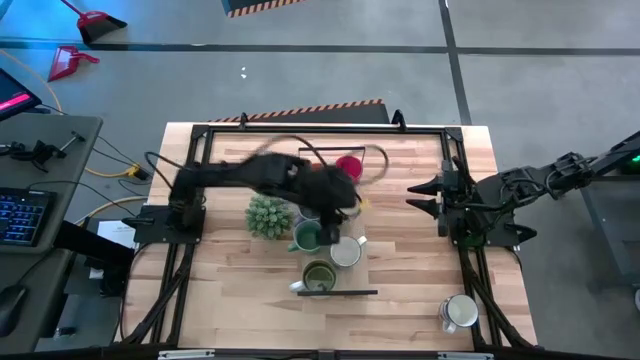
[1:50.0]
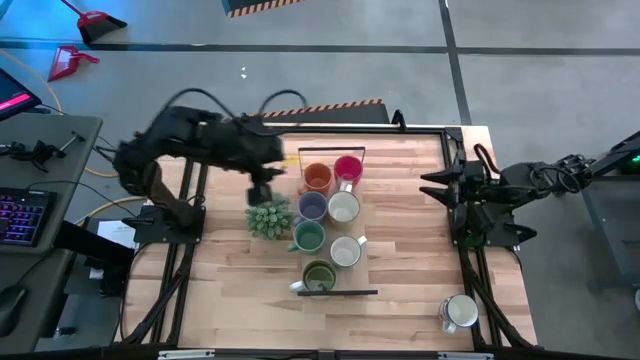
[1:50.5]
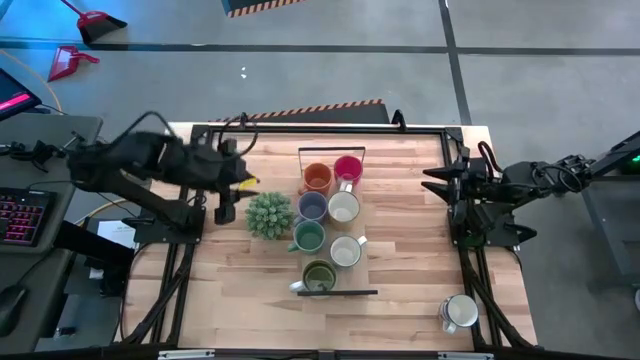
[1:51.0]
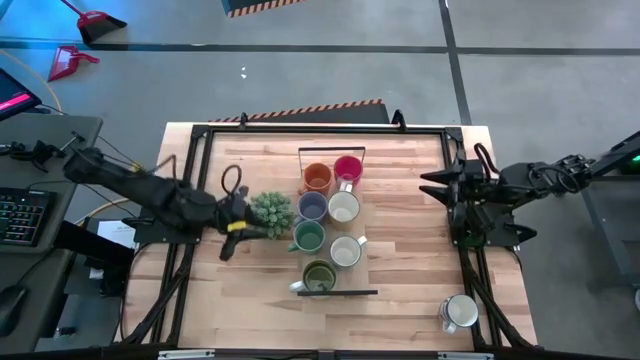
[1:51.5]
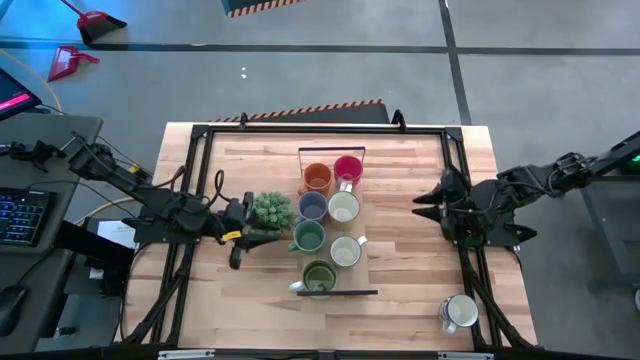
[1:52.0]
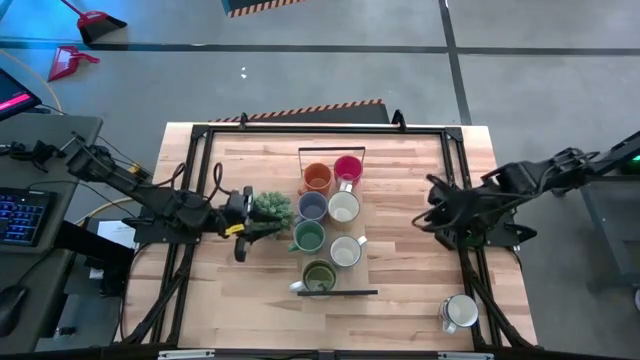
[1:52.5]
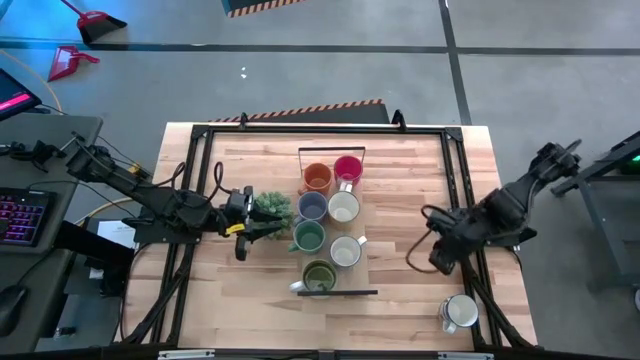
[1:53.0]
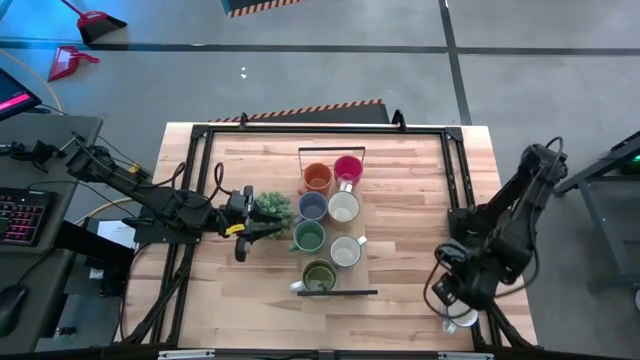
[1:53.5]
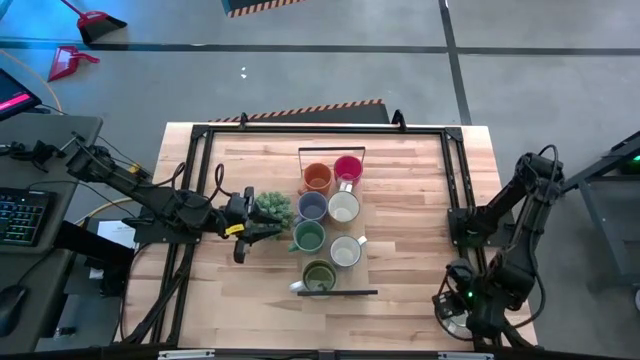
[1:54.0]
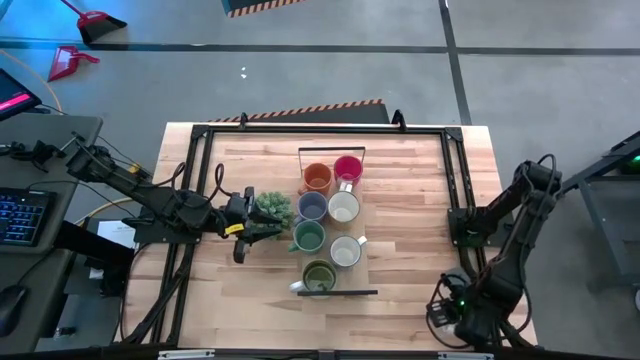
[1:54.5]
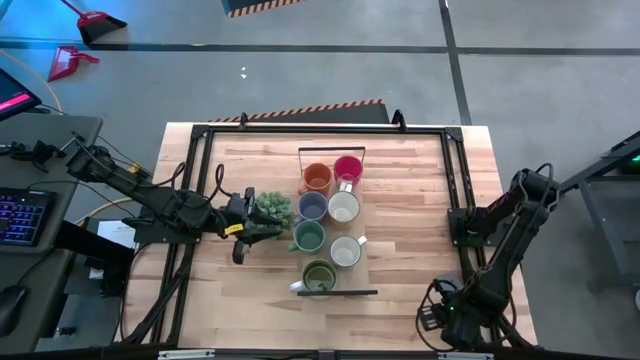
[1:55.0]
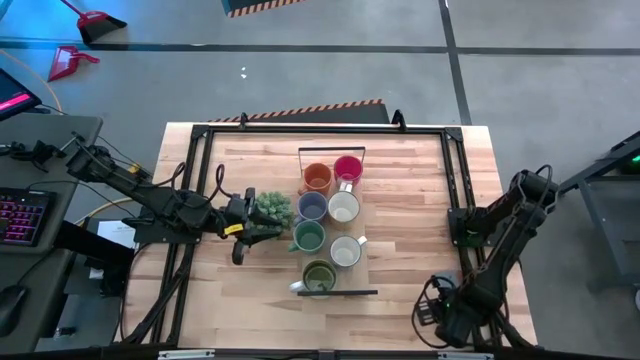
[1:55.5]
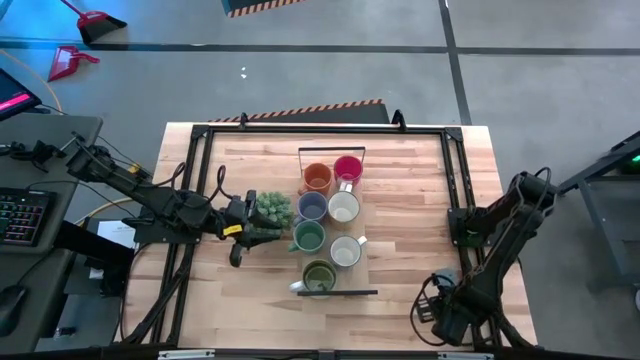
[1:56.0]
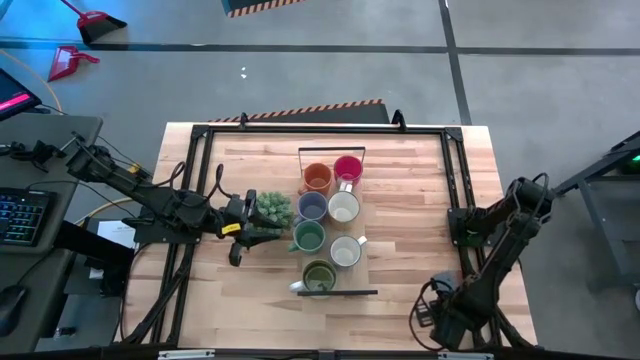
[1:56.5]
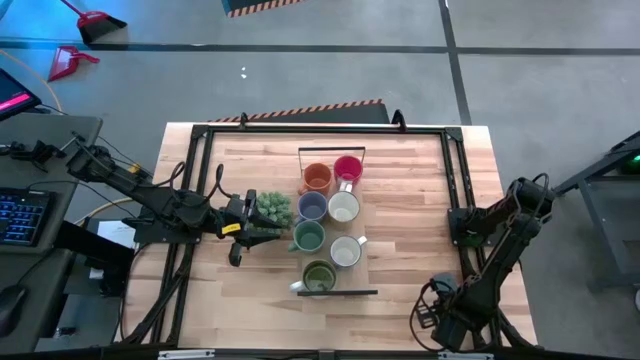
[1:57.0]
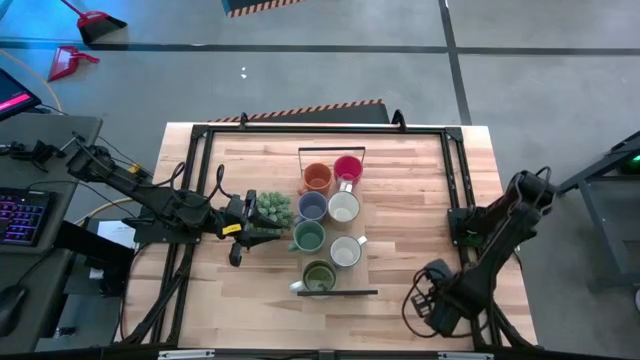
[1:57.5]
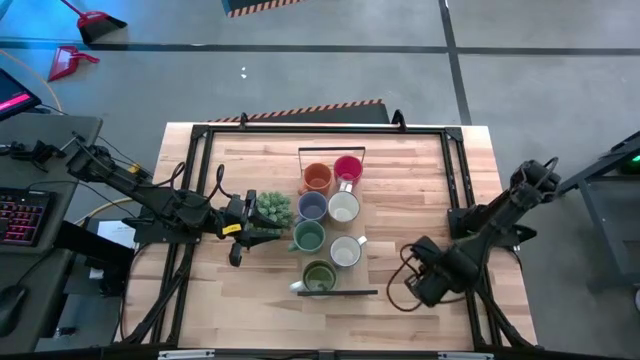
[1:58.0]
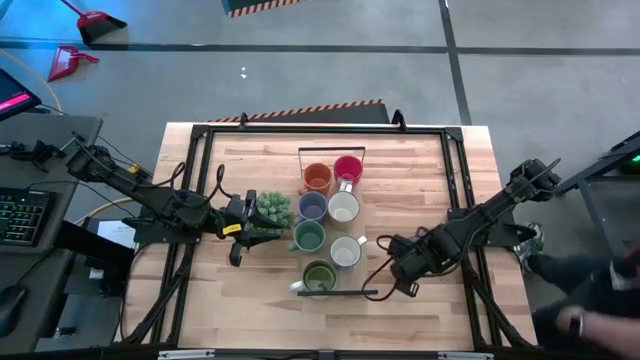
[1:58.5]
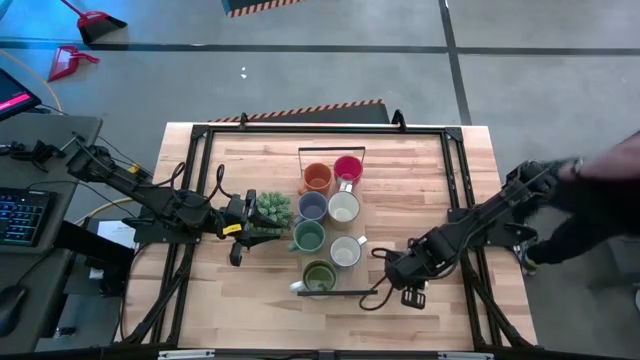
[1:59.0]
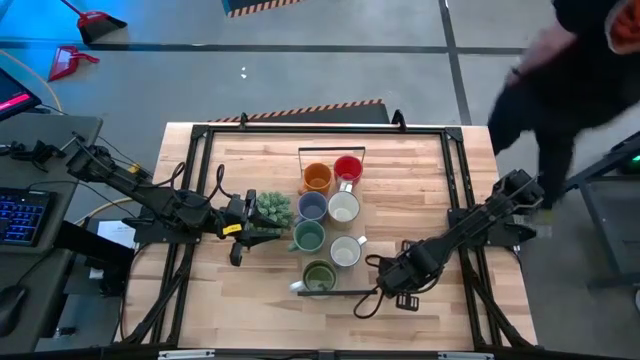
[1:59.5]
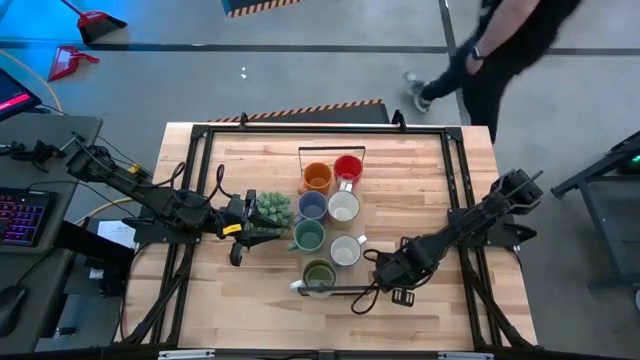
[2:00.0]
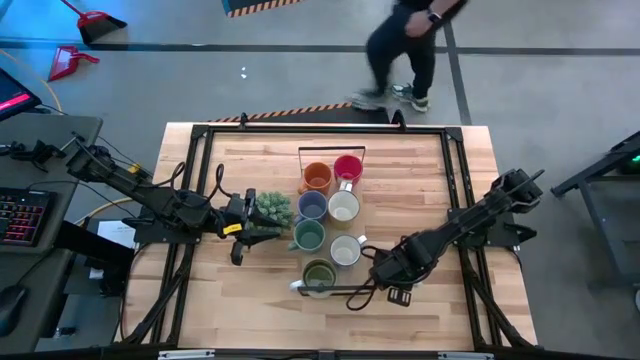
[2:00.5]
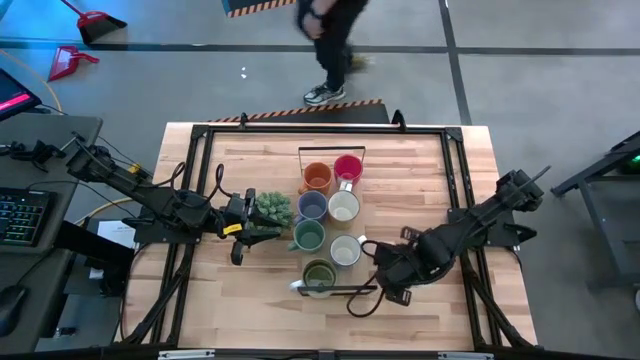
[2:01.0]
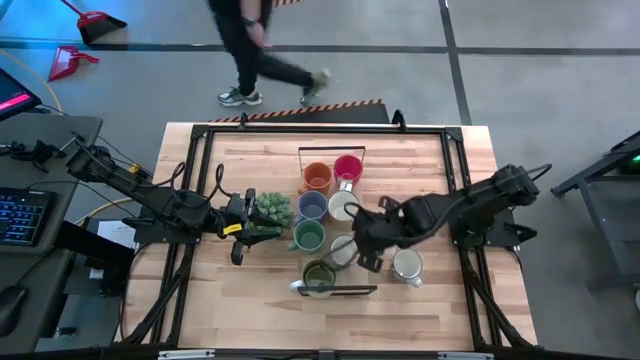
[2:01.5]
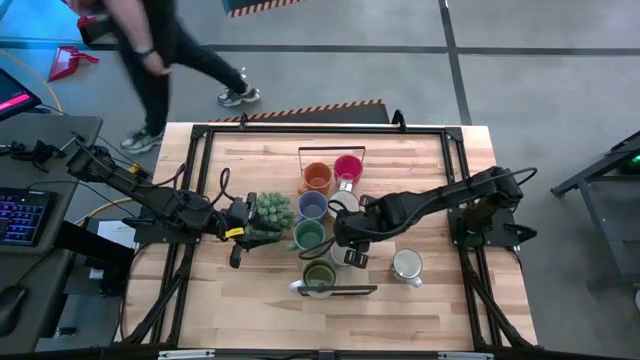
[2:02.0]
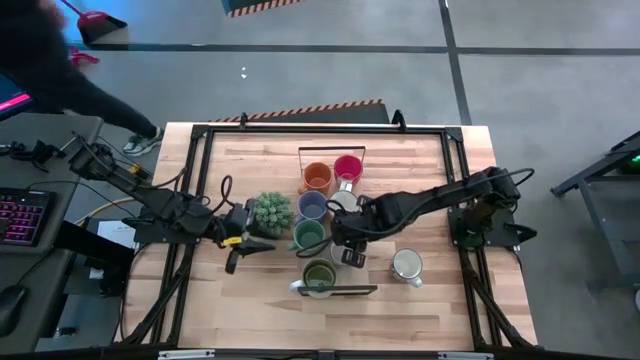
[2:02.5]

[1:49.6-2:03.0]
Task: Place coffee mugs
Put the blue mug on the shelf

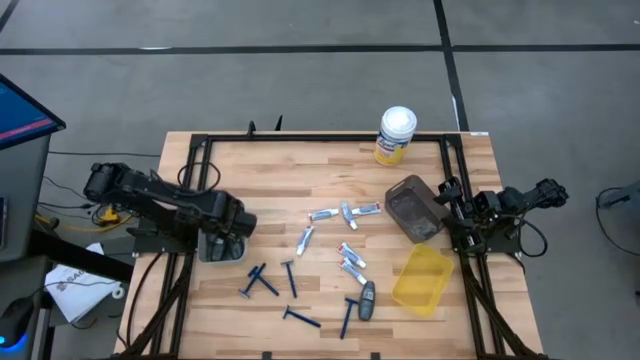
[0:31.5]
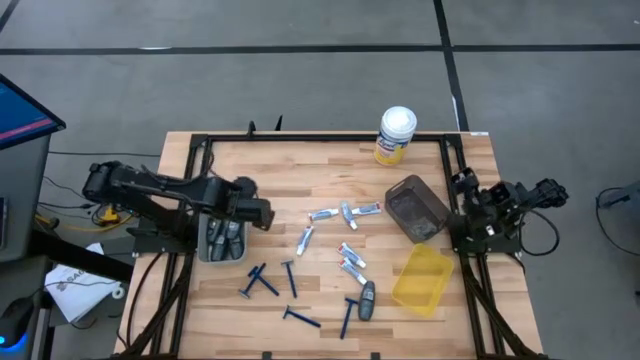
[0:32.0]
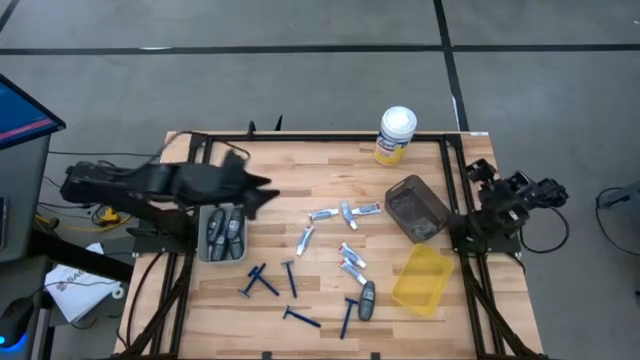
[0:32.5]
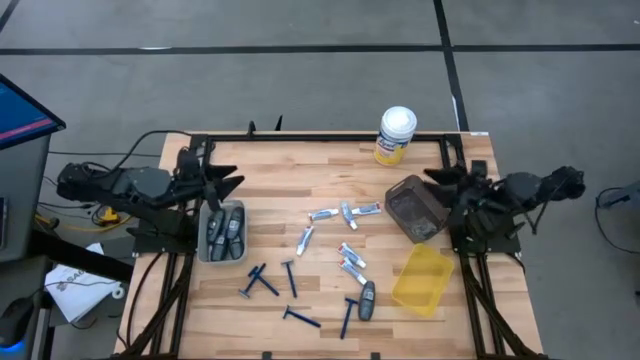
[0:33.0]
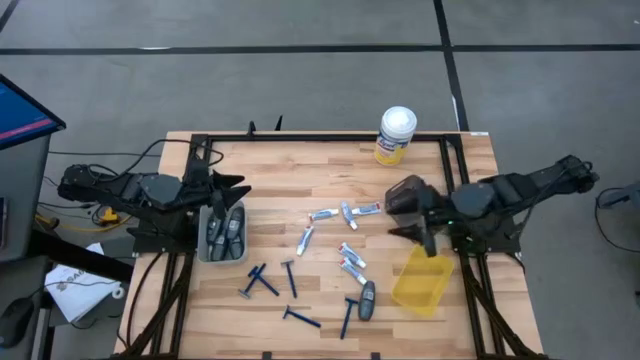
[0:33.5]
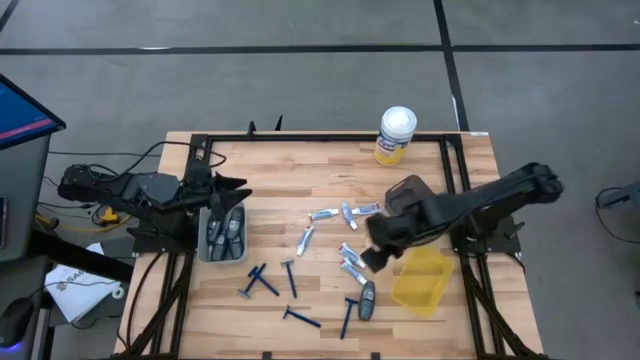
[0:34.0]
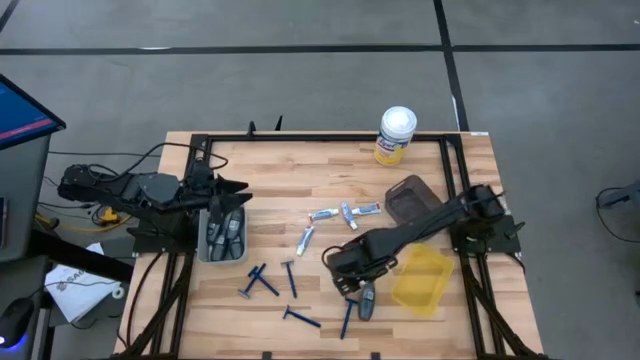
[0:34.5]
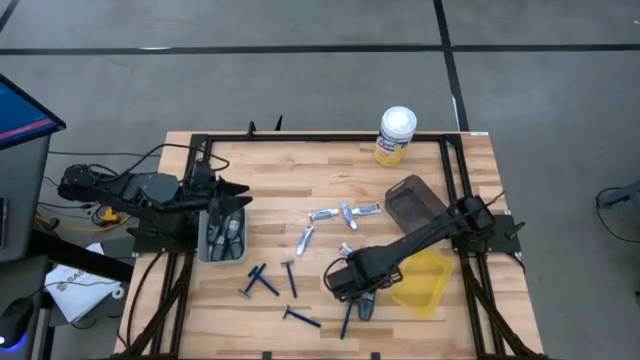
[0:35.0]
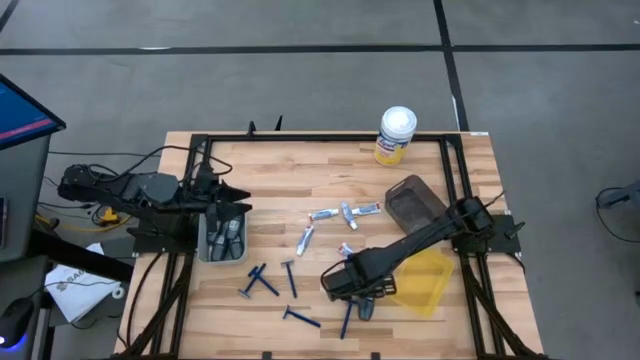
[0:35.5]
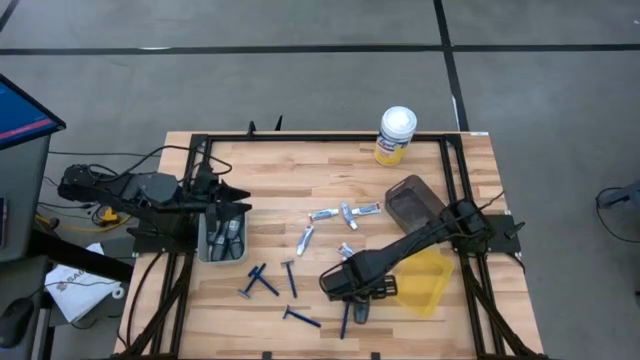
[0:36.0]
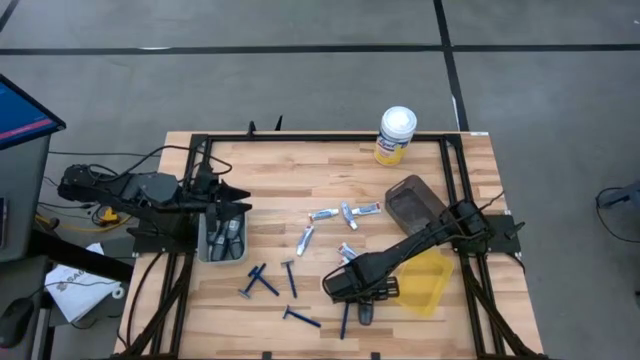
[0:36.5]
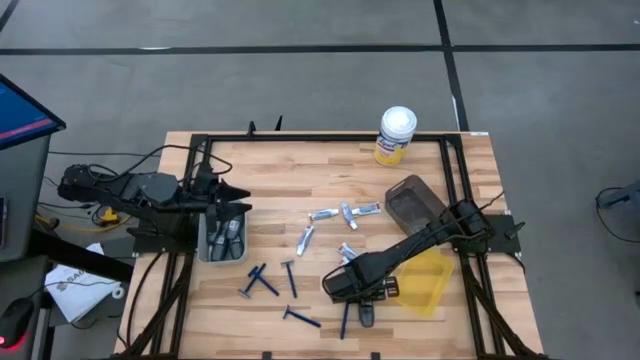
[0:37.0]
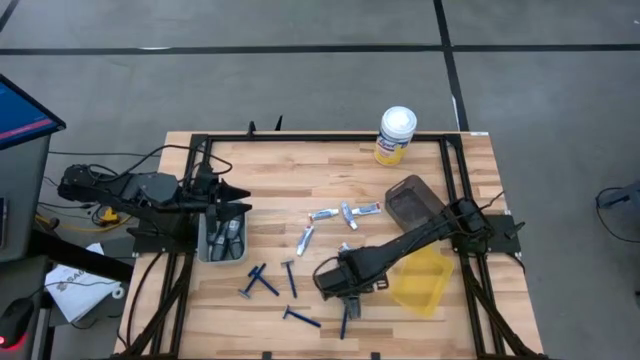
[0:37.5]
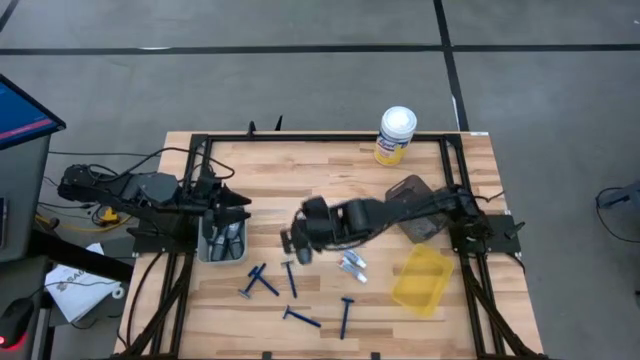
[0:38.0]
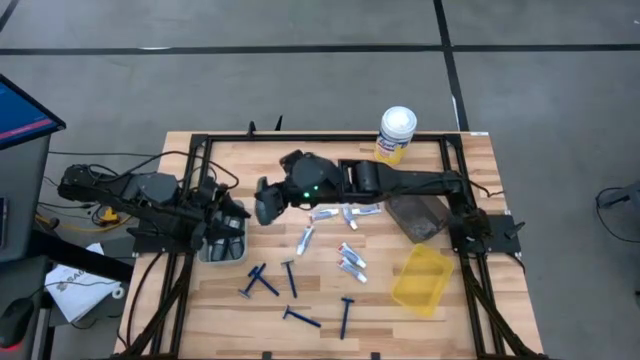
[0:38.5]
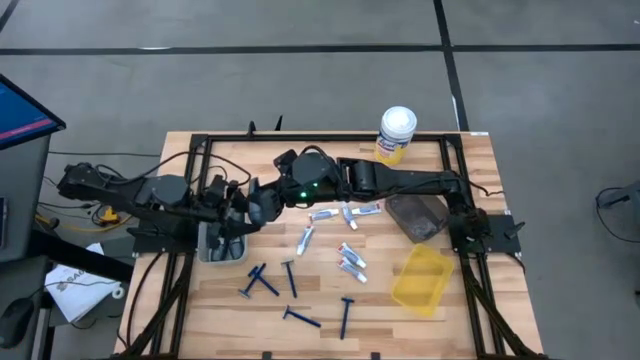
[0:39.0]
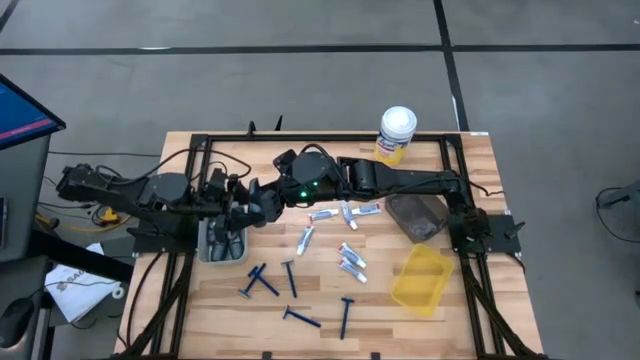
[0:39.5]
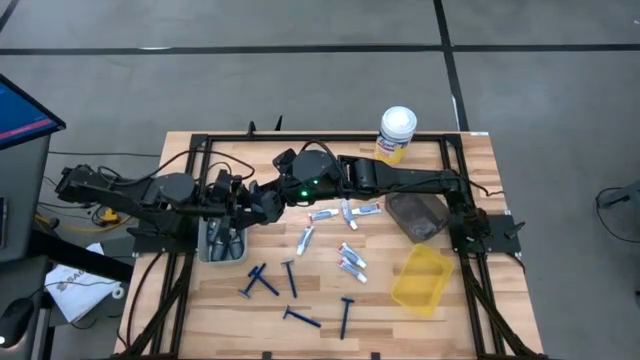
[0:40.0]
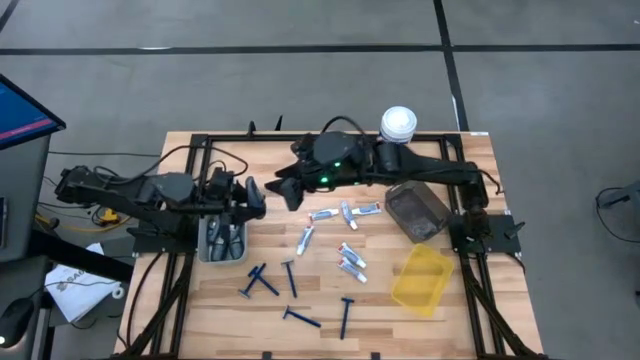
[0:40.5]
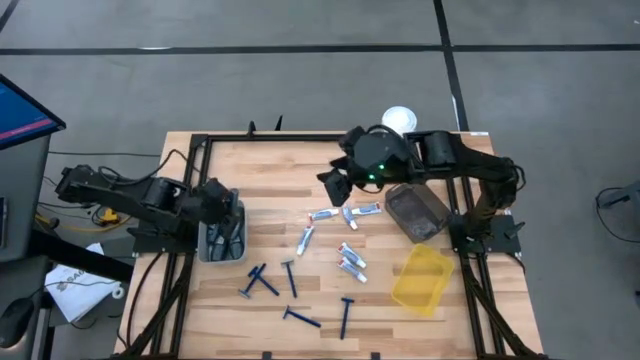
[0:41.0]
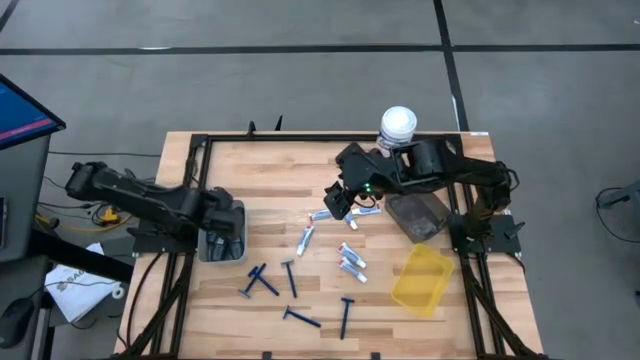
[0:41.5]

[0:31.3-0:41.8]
Task: Pick & Place Travel size toiletries
Put the gray deodorant into the gray bin
